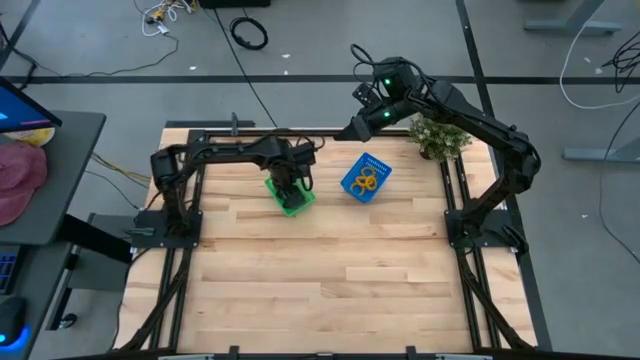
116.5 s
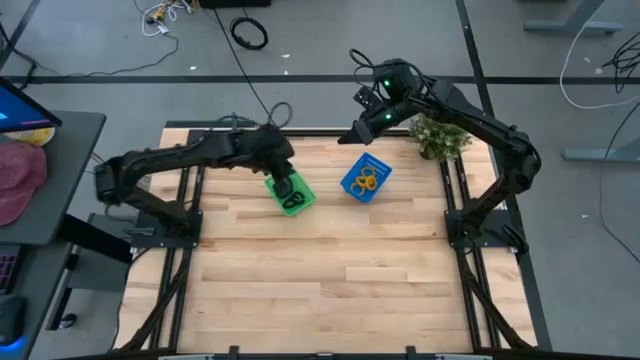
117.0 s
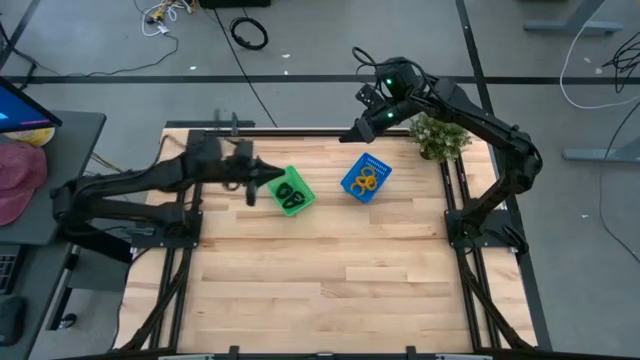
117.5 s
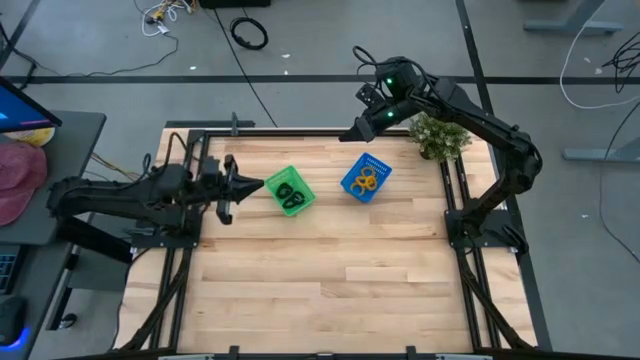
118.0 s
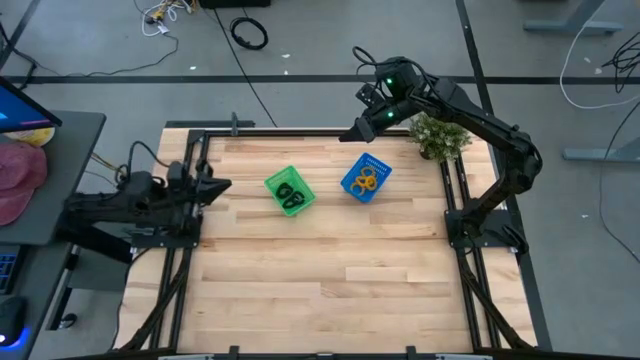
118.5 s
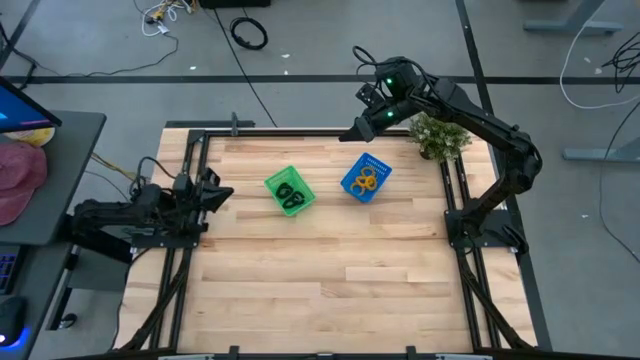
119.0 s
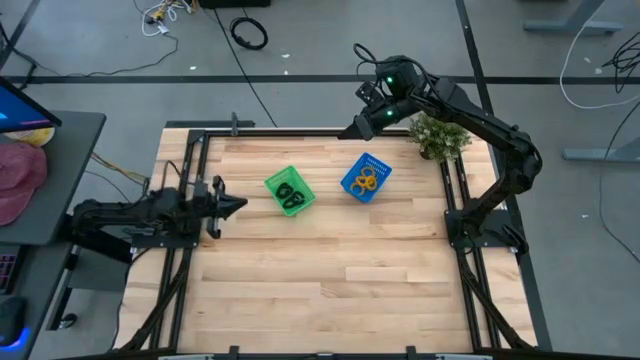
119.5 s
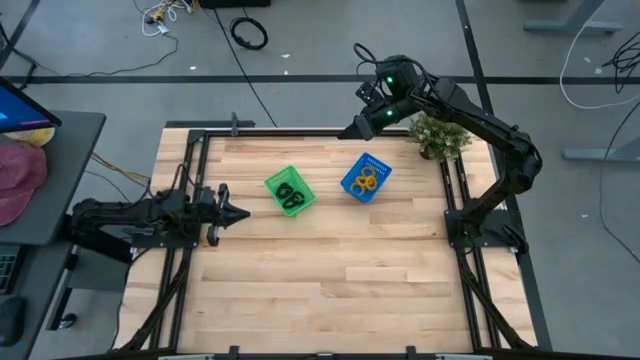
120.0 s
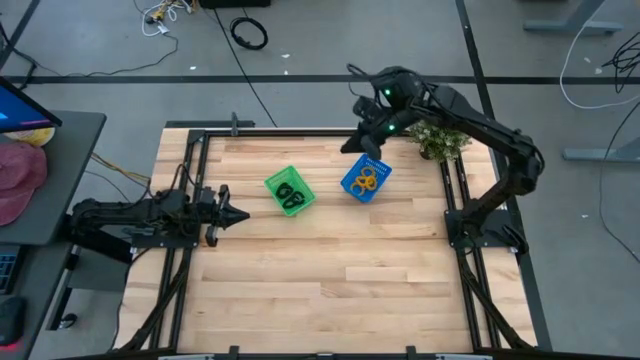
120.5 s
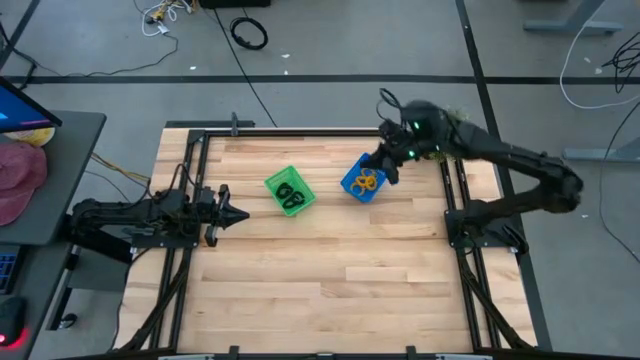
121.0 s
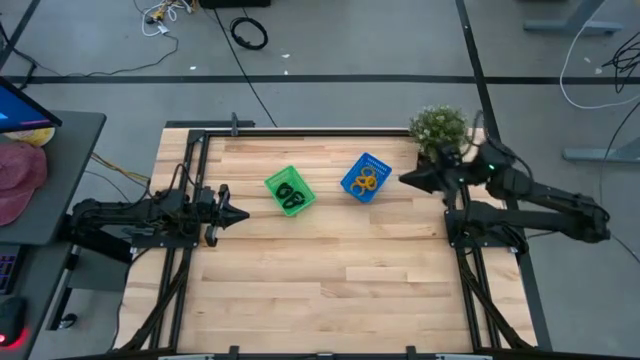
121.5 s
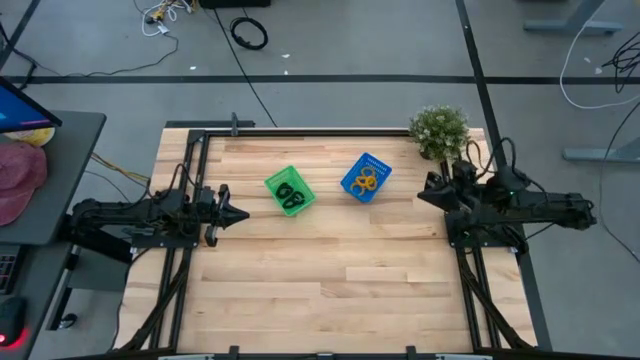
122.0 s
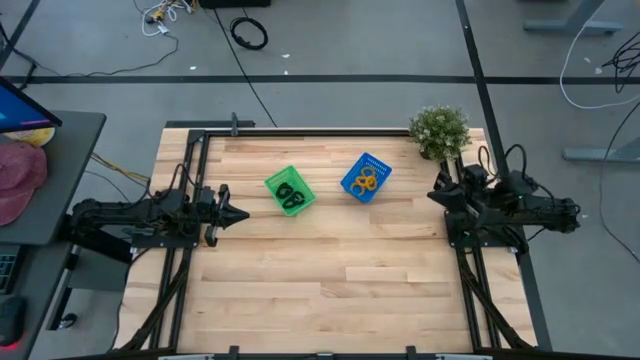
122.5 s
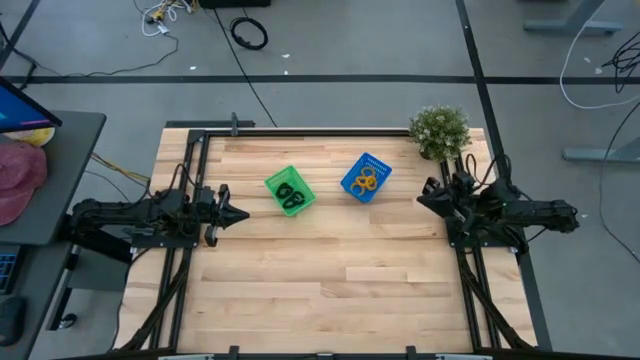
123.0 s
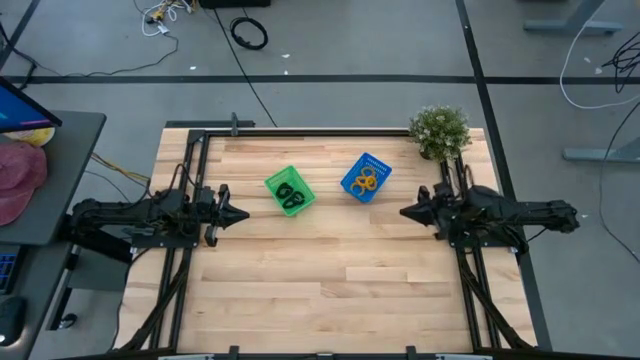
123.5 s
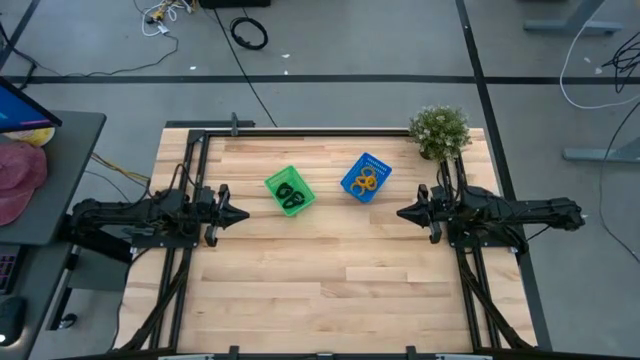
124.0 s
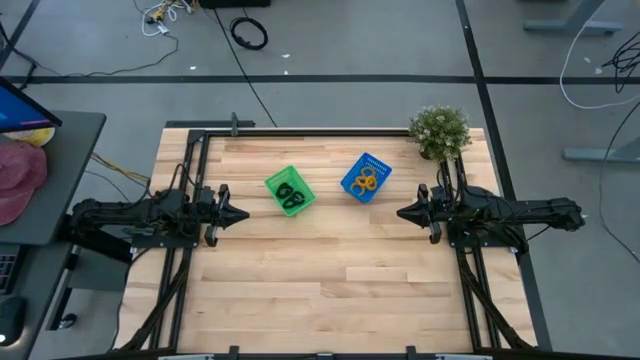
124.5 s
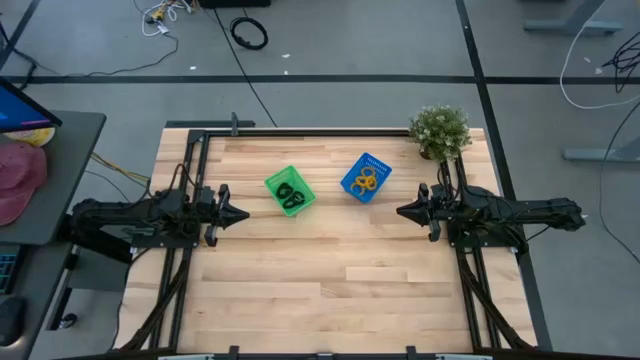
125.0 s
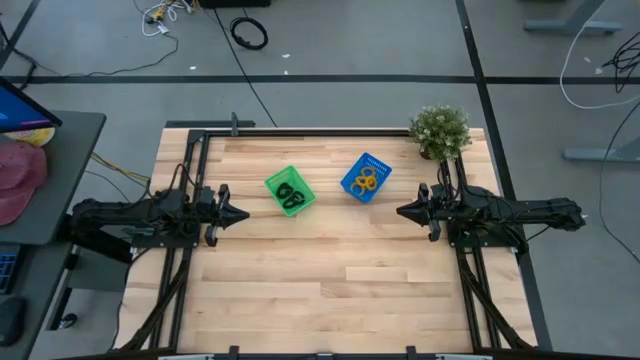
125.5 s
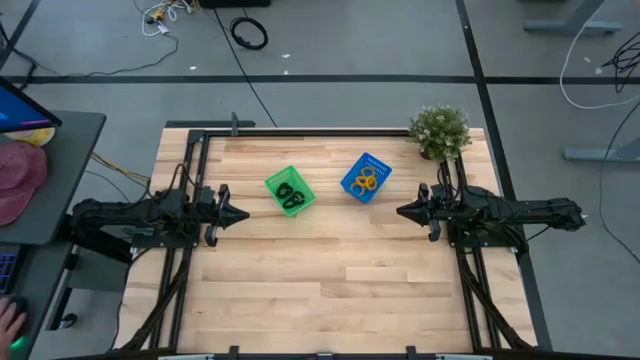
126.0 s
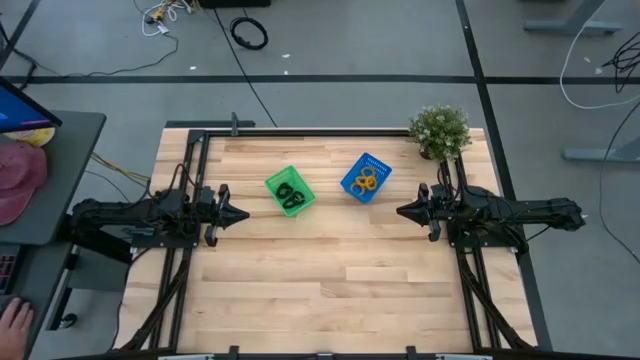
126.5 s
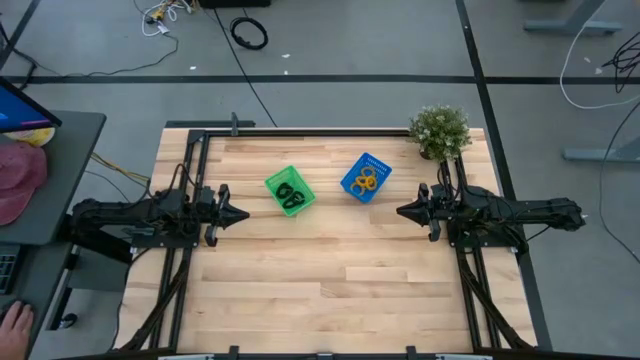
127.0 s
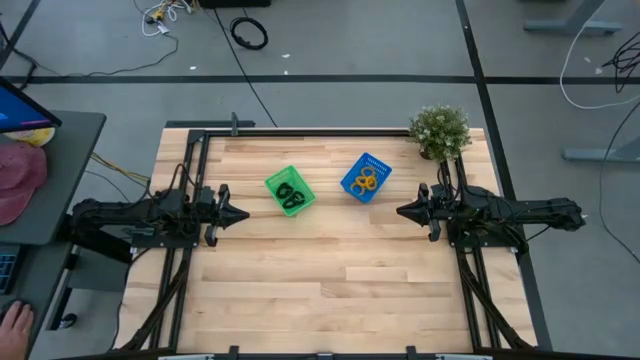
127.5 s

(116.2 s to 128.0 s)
Task: Sort spring keychains
Return to Home Position

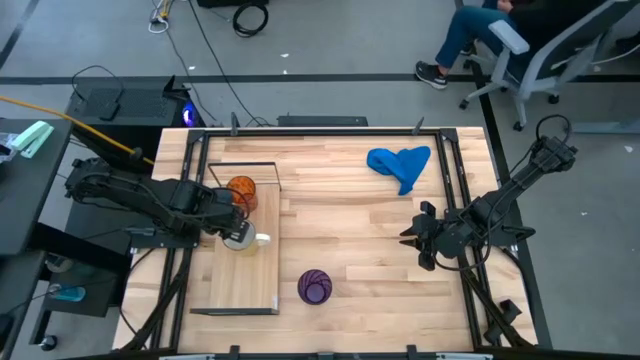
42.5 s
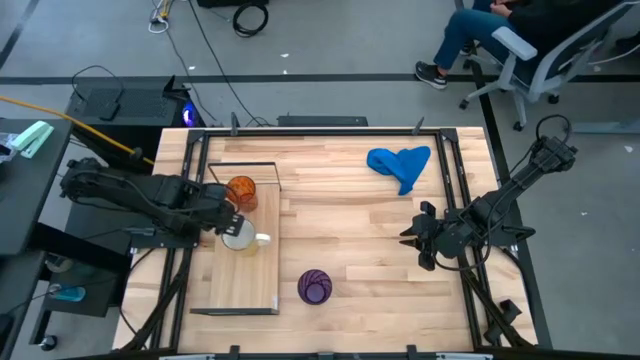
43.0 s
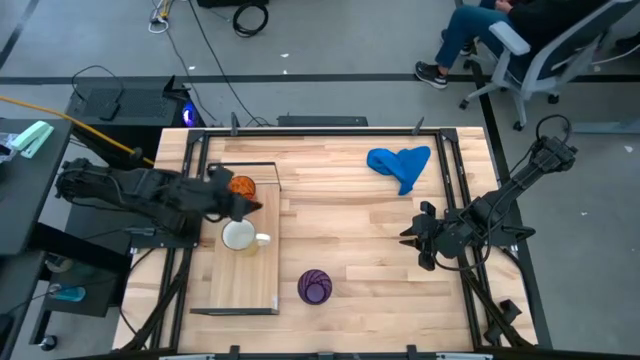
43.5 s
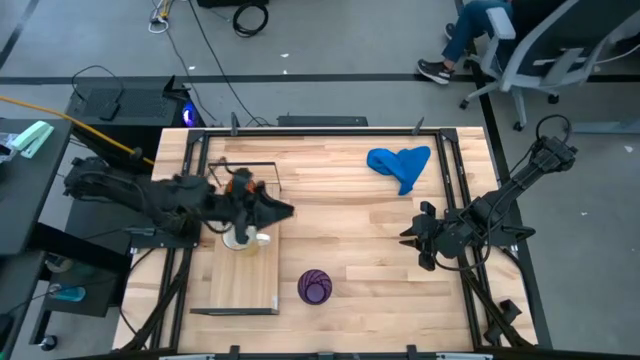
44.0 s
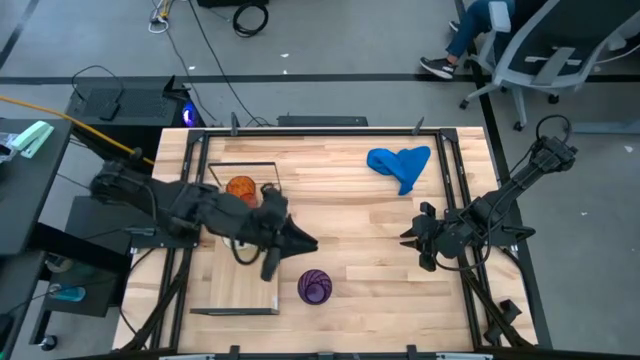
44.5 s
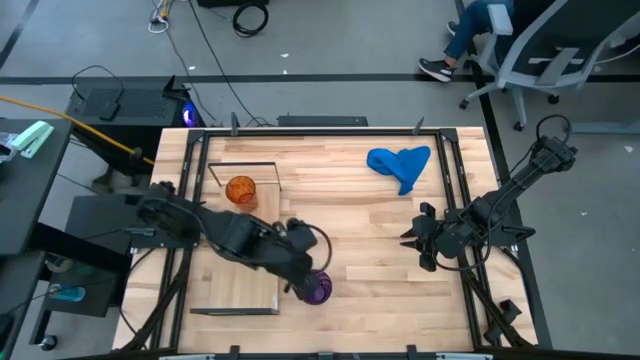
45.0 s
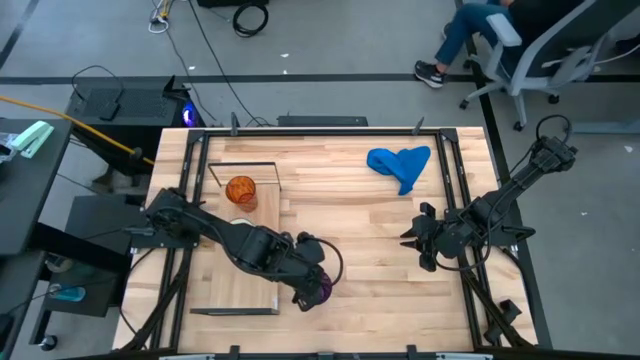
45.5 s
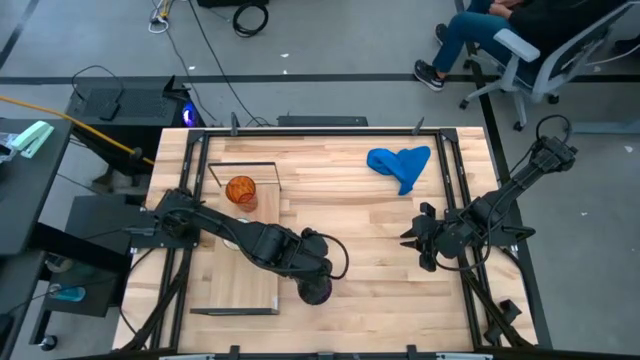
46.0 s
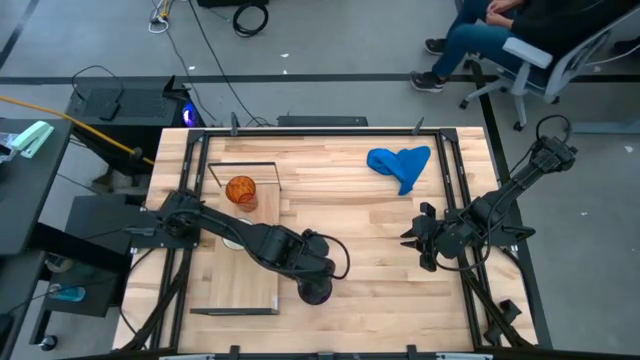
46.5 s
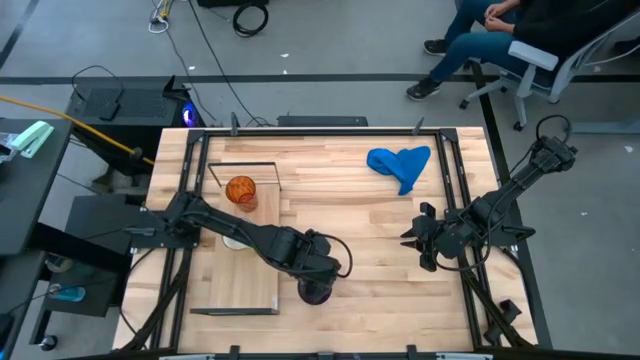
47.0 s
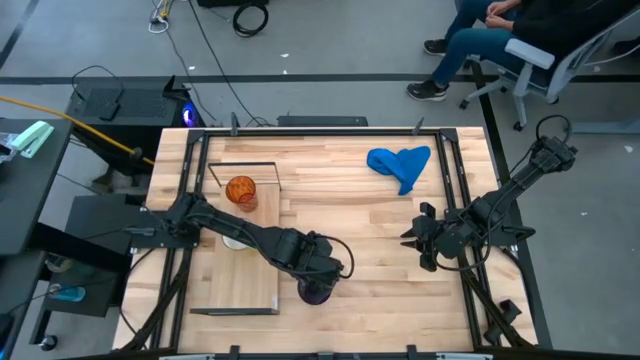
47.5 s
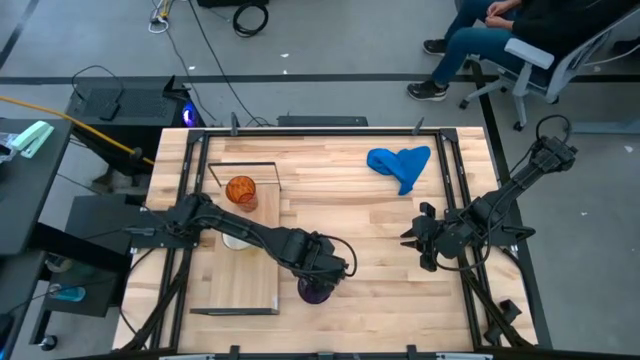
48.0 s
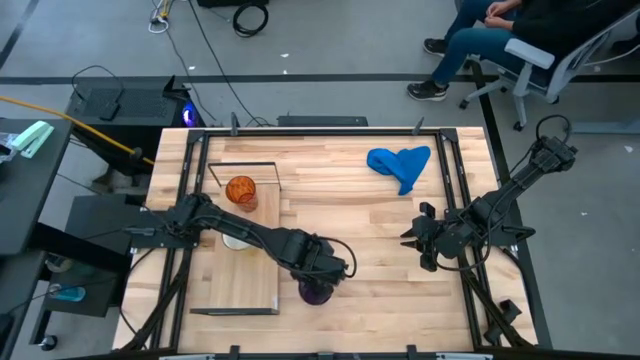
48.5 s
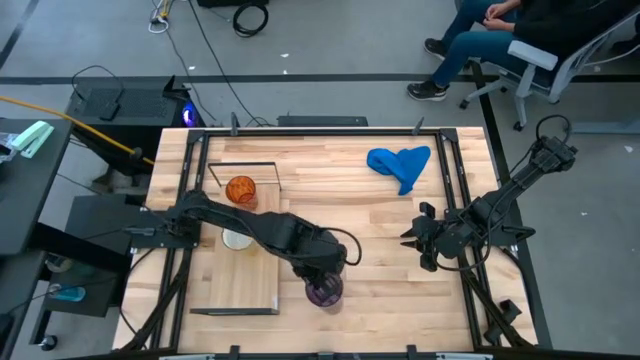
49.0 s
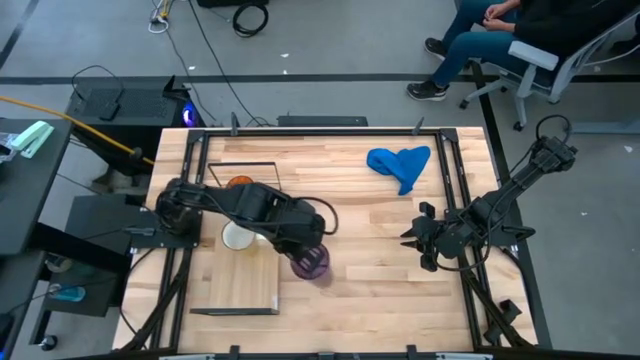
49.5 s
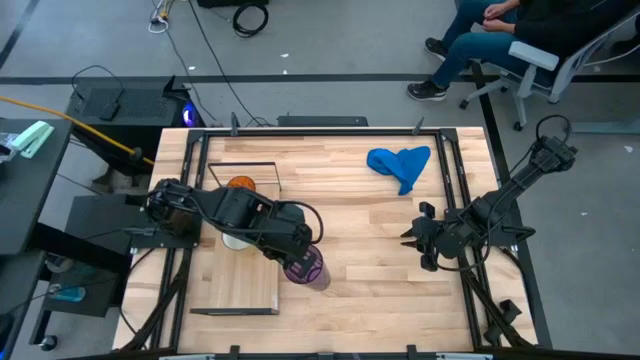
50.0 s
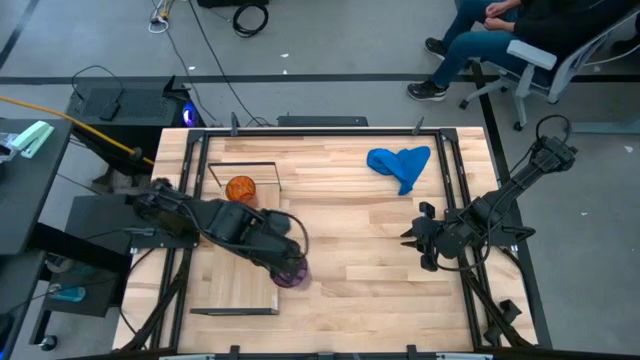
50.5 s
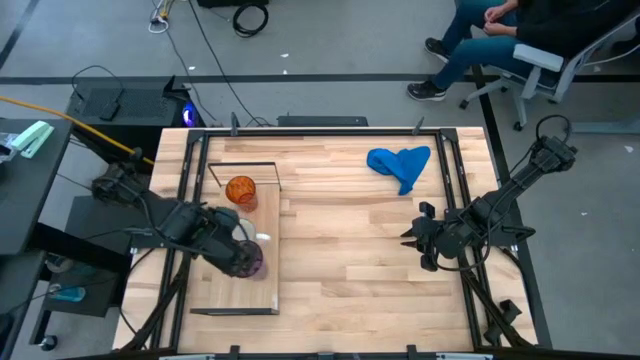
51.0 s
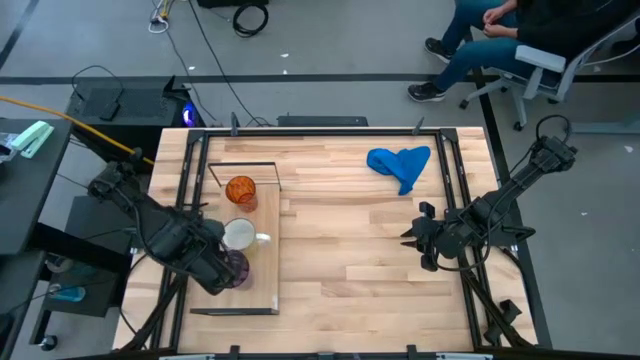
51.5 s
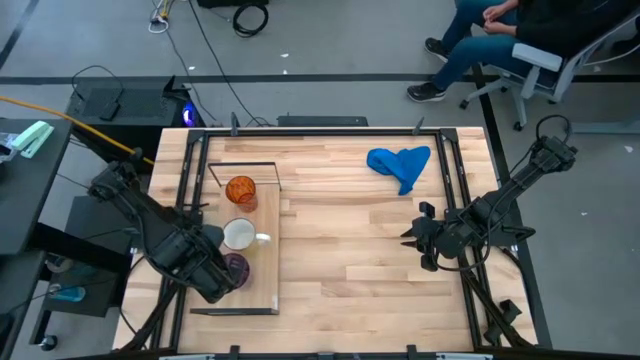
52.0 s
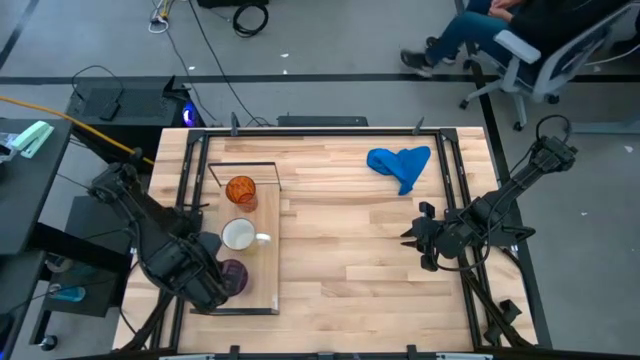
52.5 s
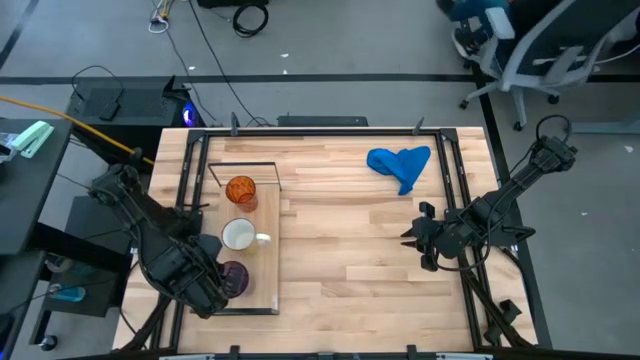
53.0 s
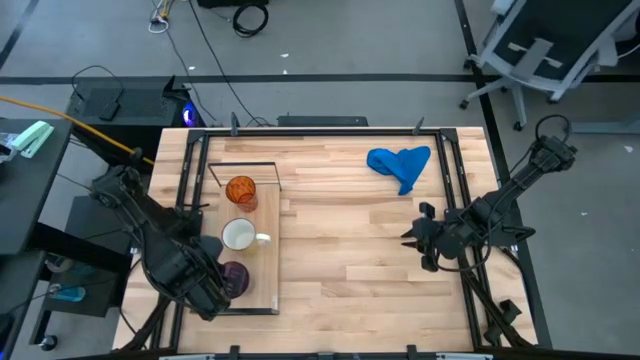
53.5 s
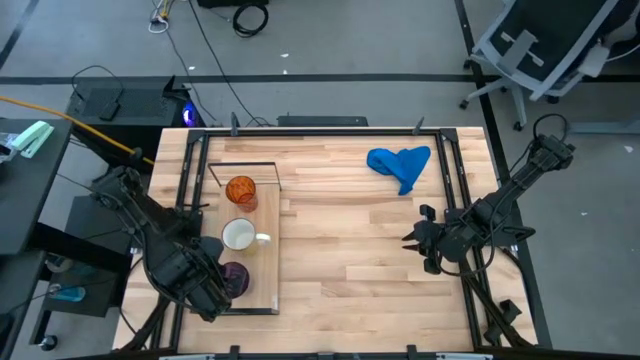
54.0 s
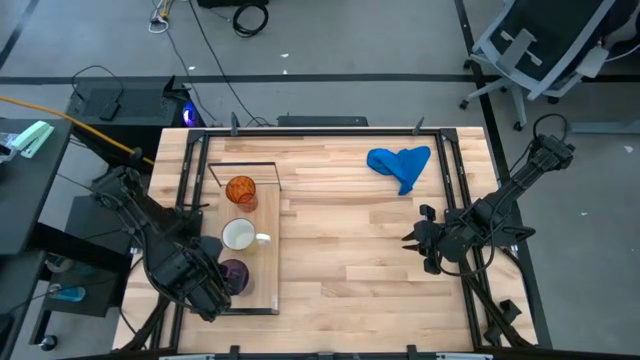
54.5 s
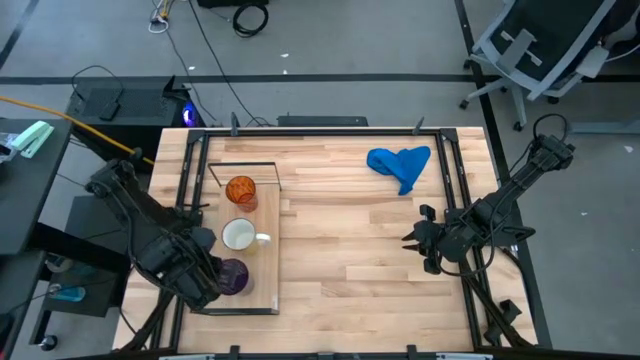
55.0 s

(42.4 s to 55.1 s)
Task: Stack small to large cups/mugs on shelf
Put the violet cup on the shelf
